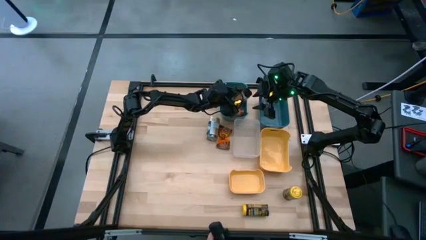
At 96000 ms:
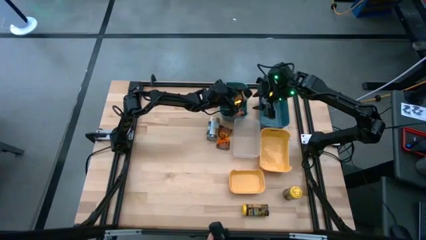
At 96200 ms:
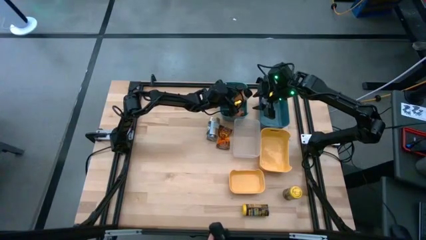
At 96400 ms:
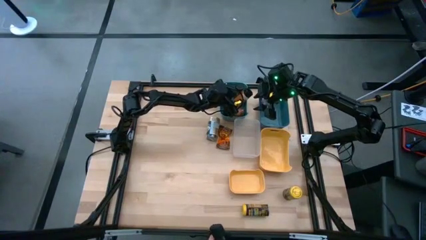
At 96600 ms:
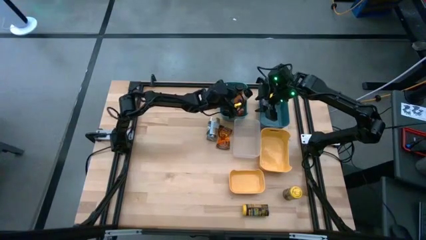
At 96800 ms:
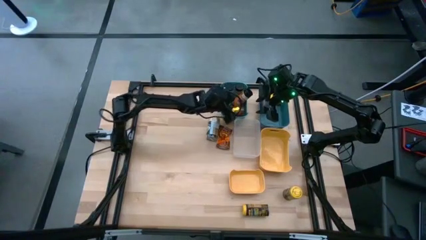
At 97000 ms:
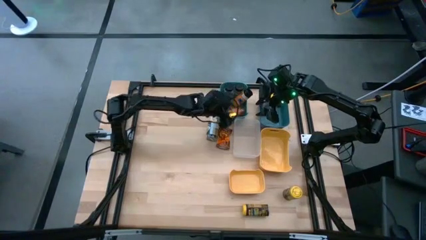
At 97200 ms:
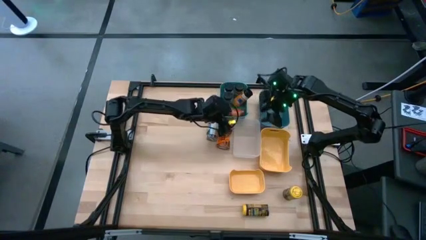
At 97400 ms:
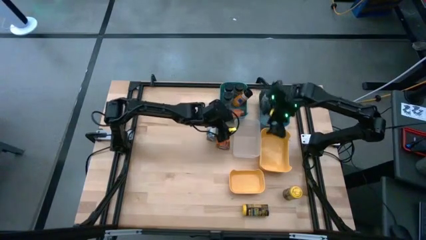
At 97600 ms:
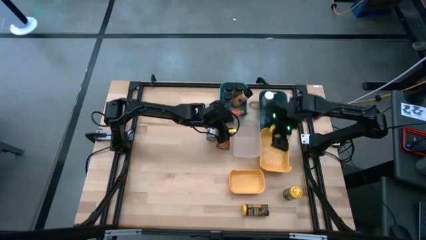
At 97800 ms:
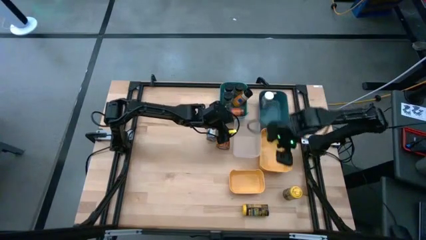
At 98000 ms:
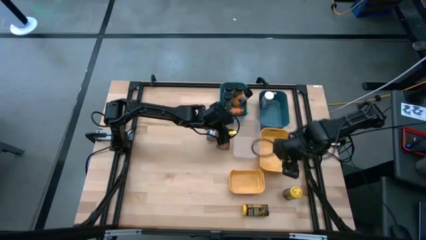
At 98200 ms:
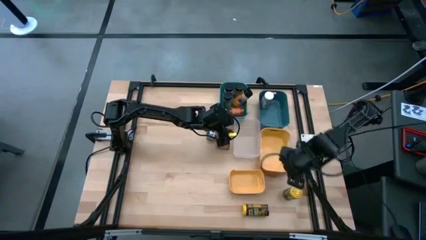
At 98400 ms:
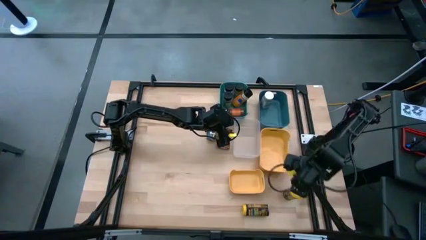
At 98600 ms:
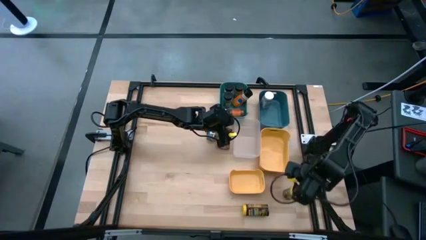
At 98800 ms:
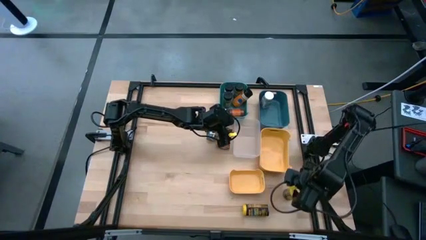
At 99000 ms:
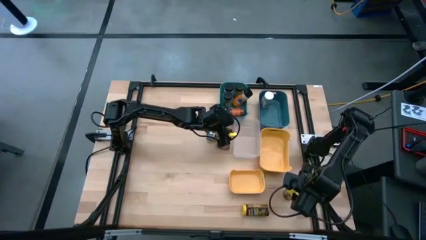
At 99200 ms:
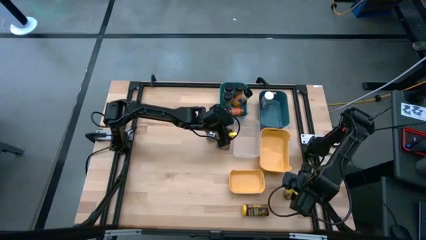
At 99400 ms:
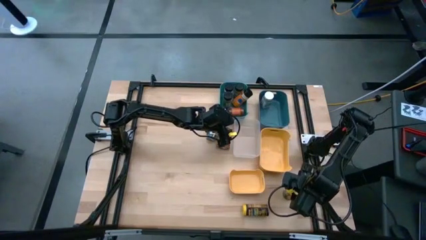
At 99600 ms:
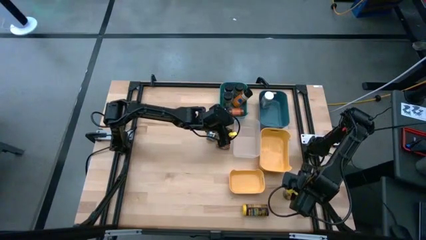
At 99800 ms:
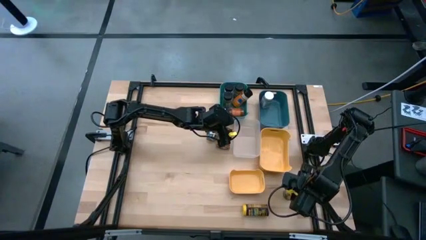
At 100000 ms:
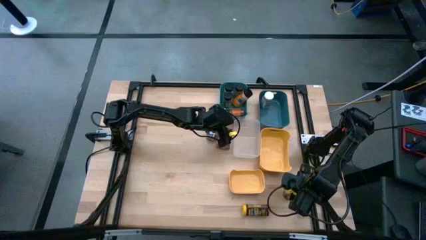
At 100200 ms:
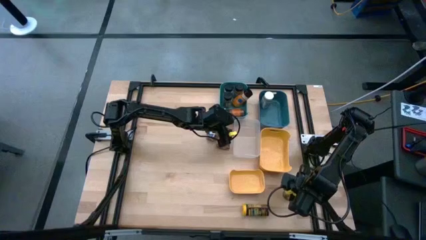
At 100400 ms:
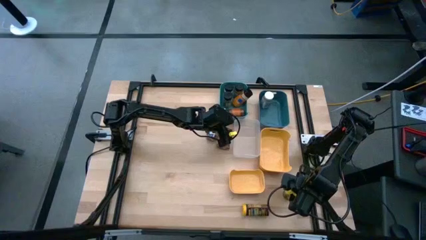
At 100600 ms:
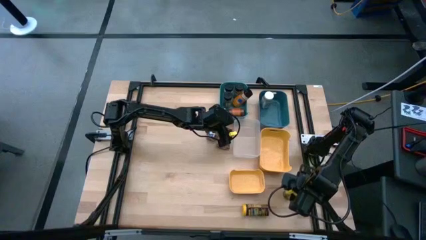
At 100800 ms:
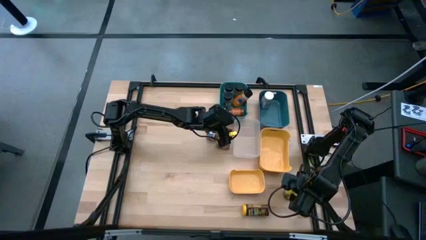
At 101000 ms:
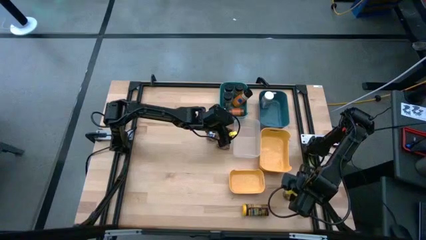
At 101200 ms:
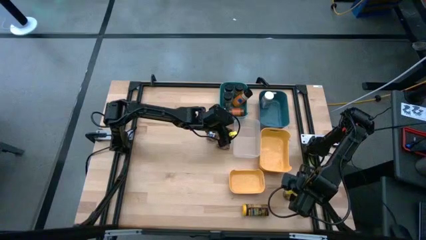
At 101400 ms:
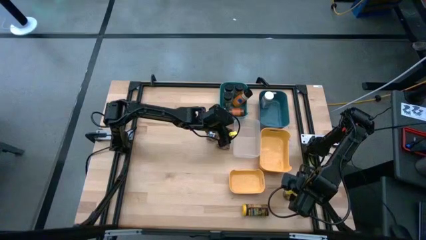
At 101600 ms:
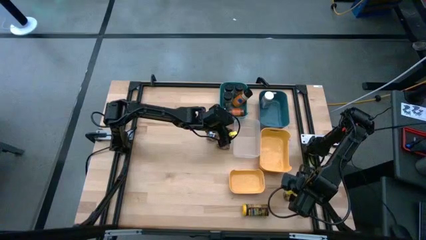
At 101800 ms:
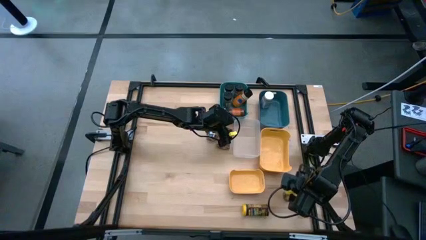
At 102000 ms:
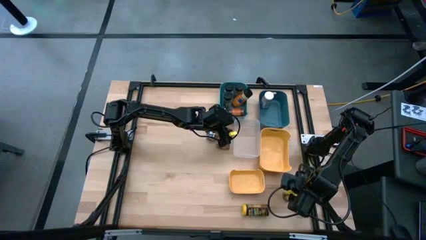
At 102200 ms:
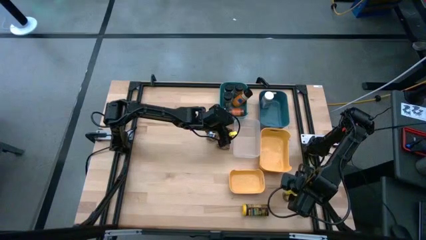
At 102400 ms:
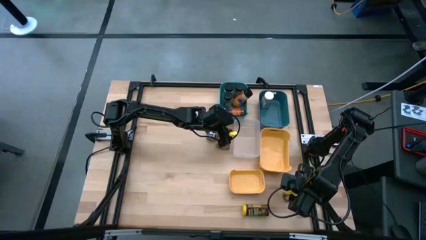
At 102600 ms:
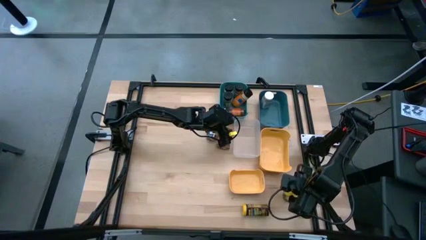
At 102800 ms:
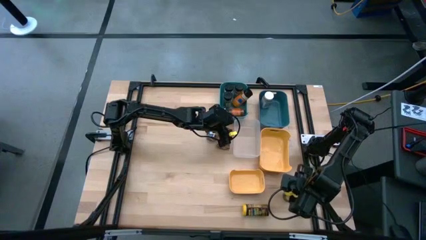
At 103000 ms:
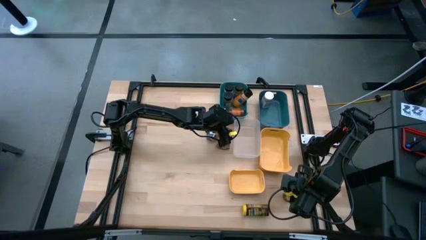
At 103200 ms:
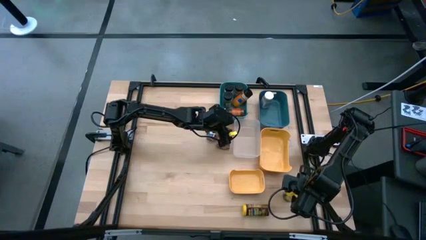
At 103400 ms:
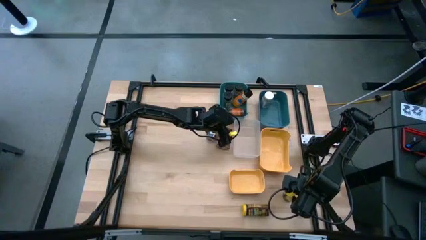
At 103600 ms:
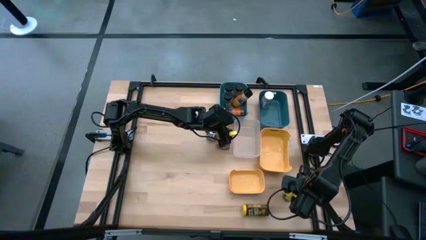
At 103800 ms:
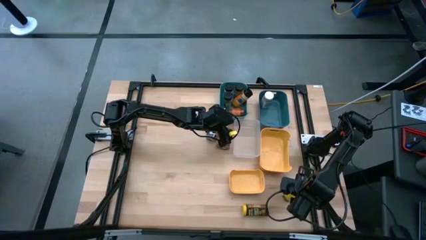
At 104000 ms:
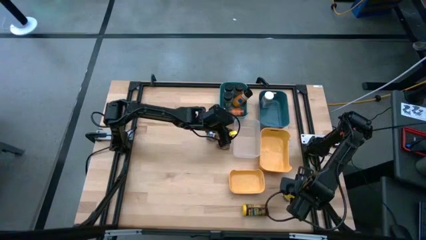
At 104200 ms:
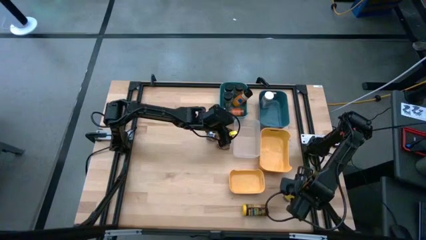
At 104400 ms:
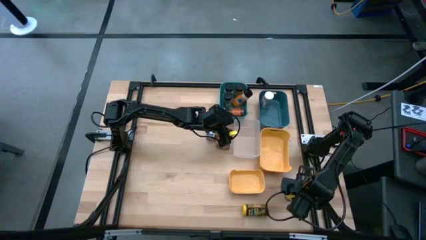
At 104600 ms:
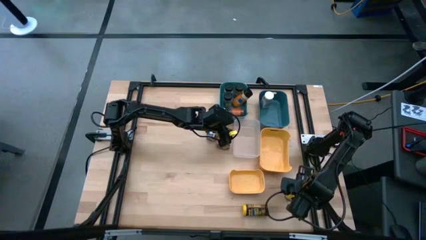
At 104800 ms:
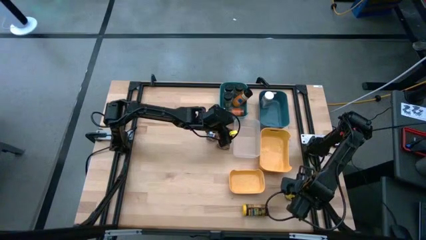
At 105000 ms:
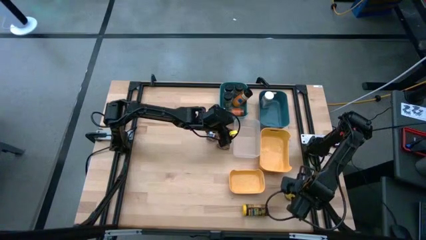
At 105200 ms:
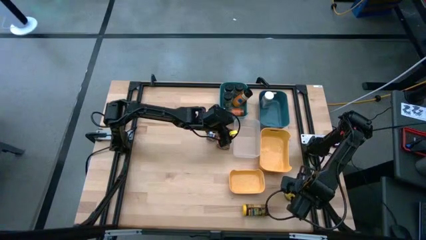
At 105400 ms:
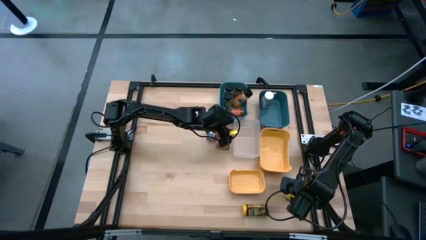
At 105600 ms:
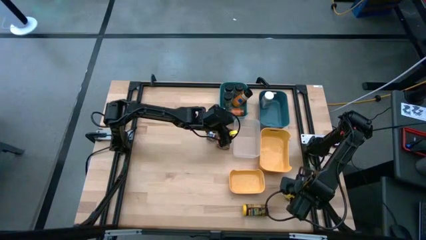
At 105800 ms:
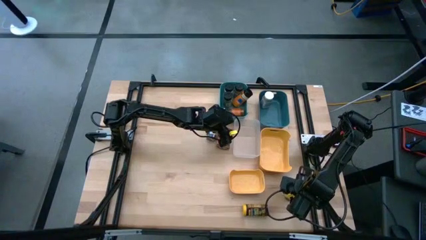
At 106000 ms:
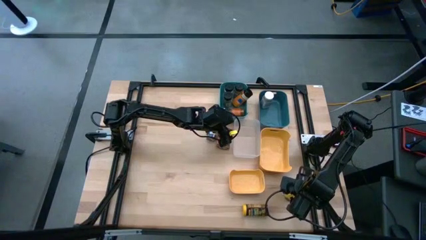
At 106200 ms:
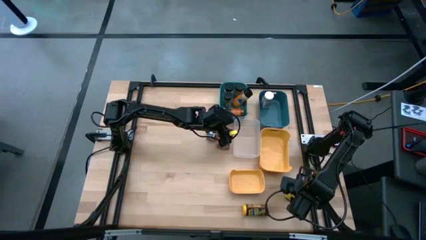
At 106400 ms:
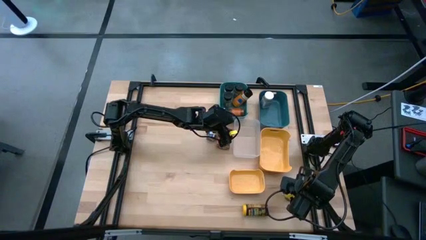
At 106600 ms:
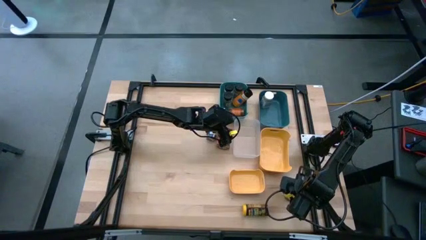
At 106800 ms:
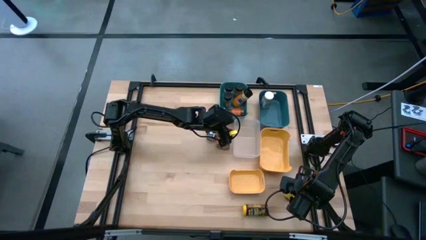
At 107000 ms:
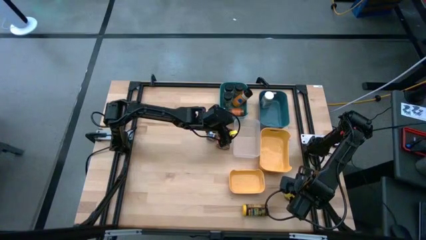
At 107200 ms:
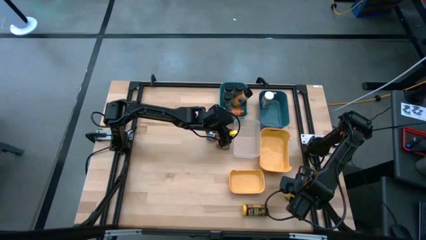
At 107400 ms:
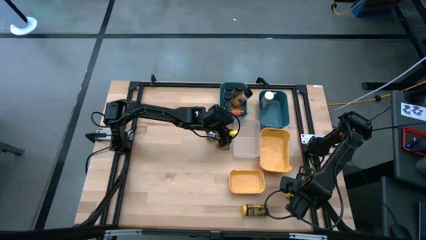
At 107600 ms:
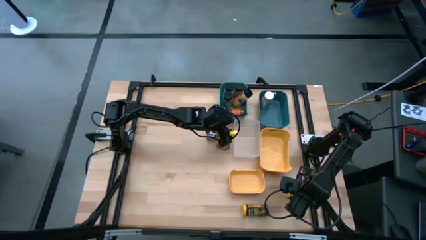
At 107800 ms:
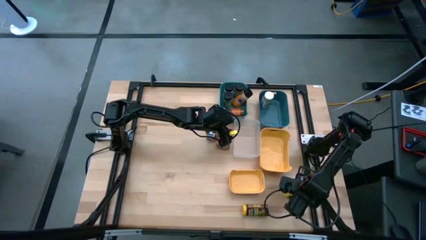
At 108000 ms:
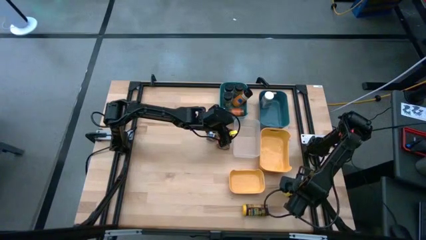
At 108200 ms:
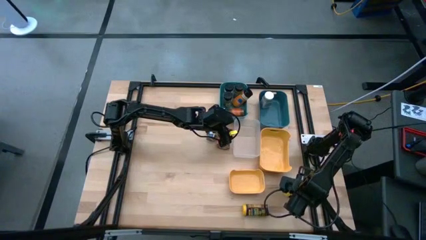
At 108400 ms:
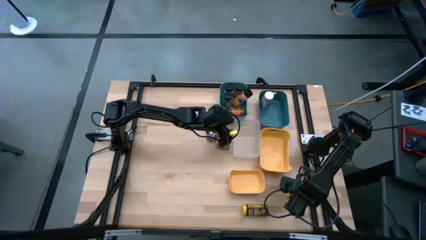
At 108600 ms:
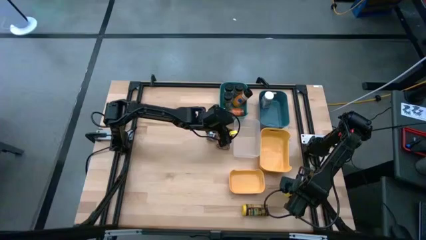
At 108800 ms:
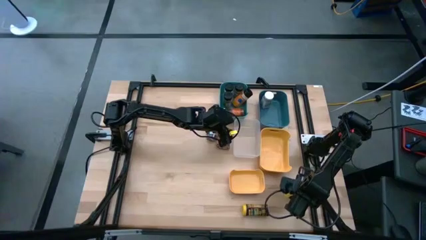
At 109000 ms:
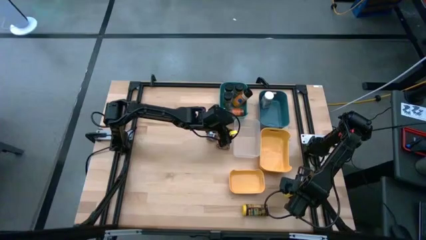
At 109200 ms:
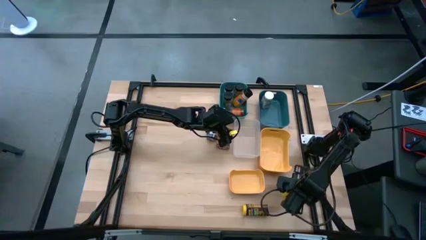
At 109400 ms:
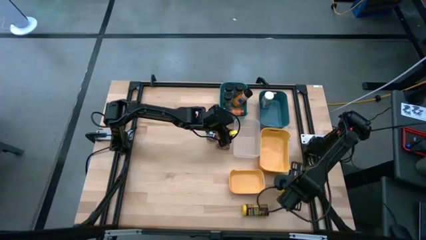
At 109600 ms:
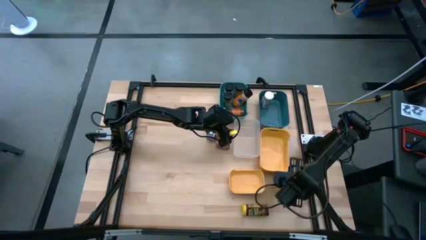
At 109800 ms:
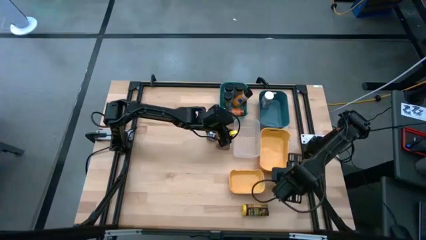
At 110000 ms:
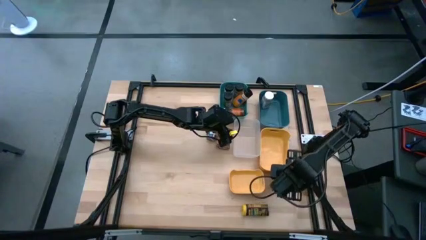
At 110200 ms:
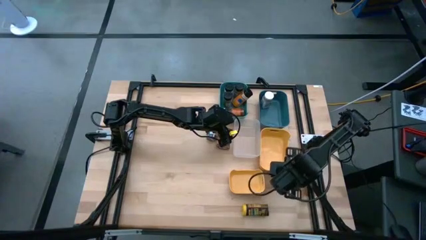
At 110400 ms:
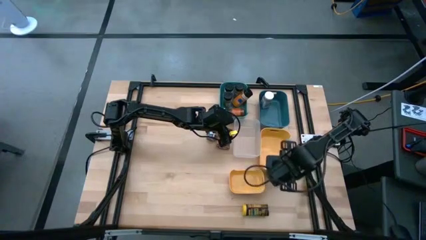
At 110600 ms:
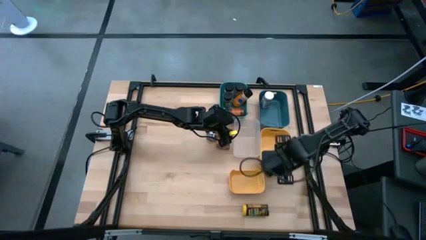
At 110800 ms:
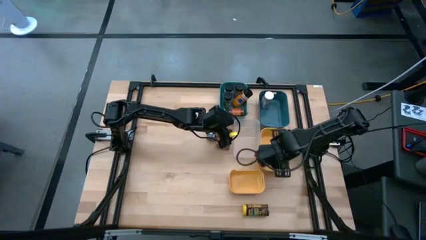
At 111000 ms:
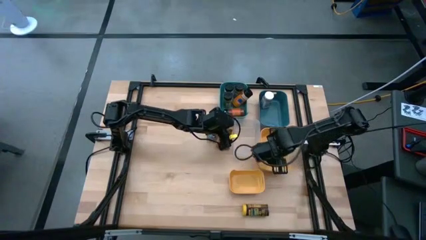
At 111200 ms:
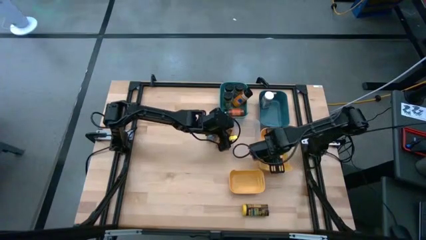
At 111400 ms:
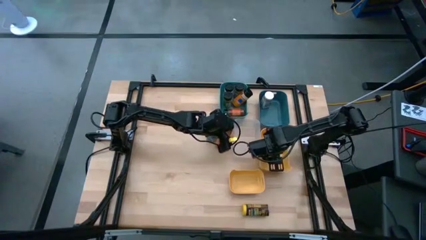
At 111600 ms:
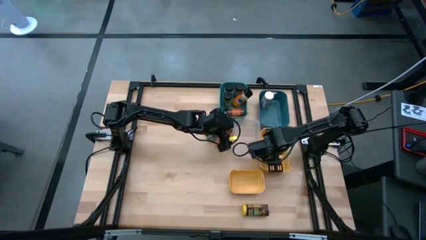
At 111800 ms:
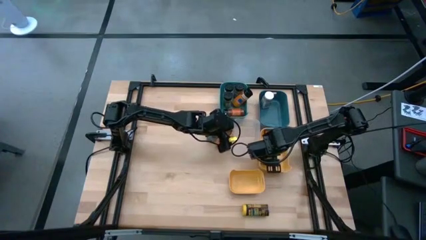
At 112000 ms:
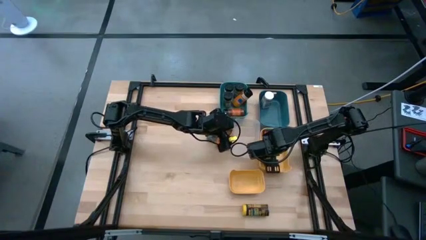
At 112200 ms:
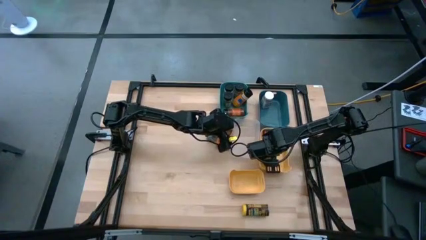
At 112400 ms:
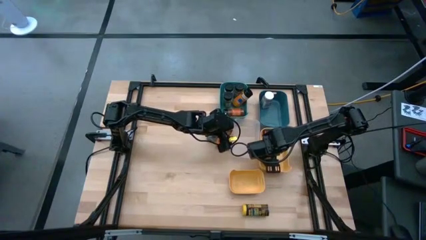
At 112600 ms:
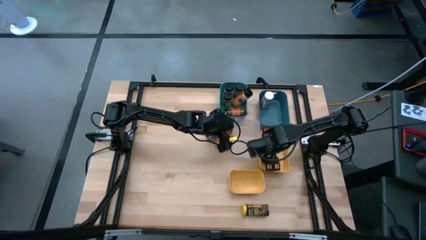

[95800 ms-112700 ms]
Task: Sort spices by type
Put the yellow seasoning into the big yellow bin
